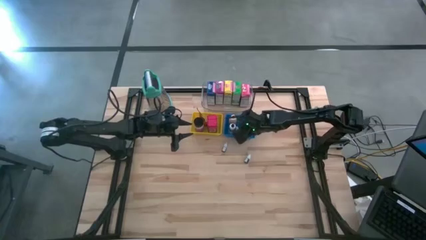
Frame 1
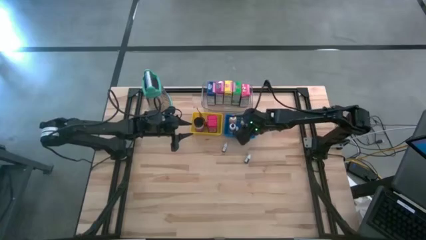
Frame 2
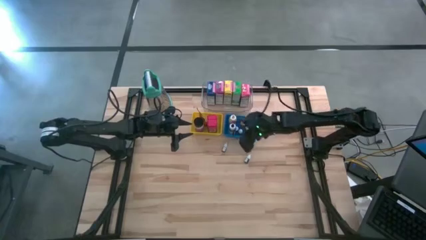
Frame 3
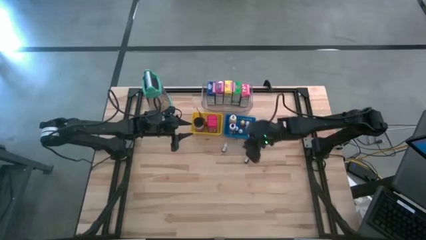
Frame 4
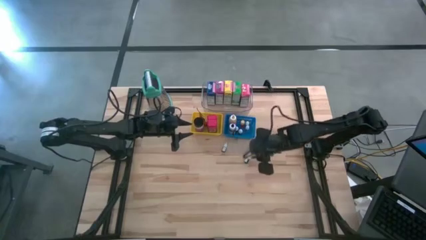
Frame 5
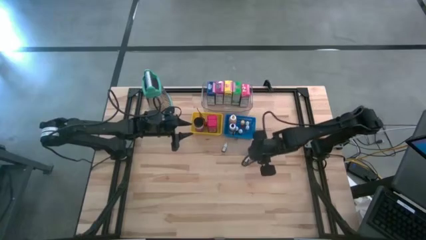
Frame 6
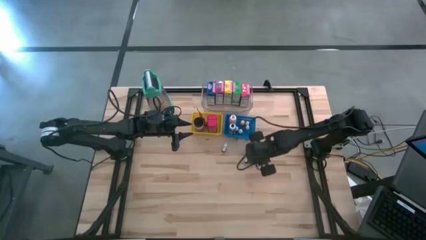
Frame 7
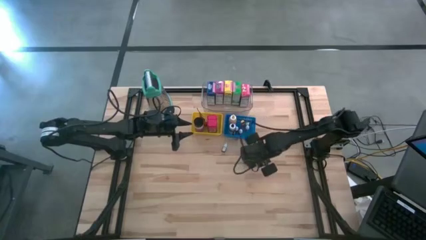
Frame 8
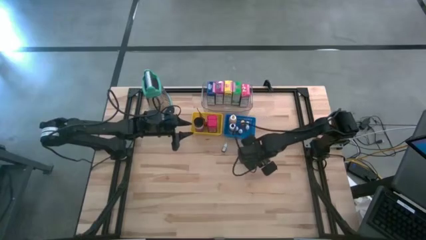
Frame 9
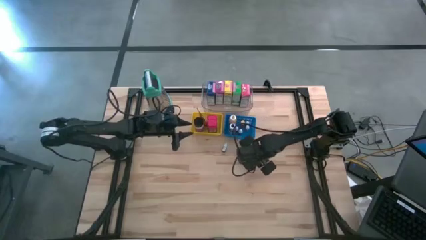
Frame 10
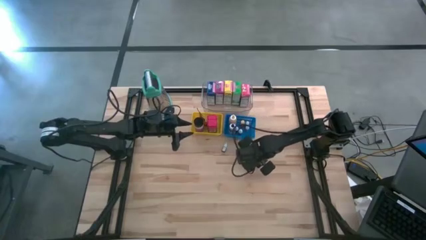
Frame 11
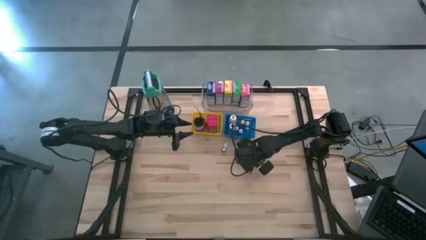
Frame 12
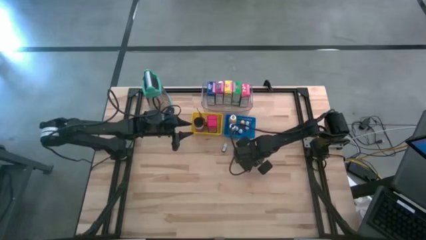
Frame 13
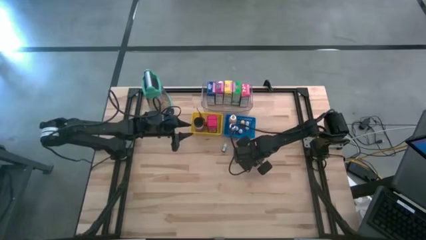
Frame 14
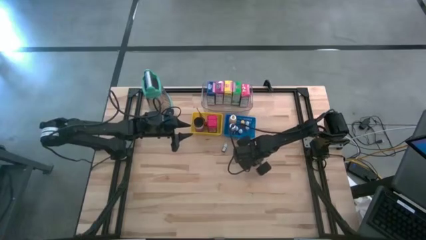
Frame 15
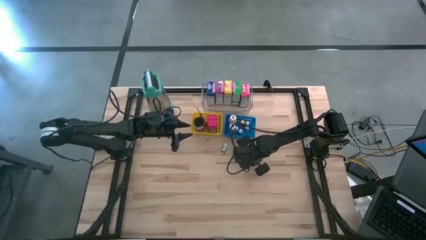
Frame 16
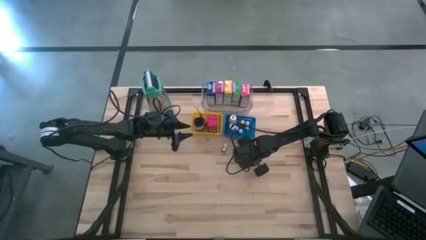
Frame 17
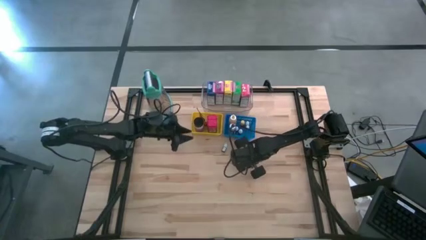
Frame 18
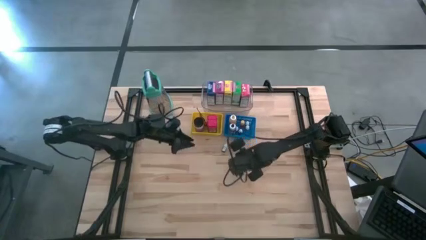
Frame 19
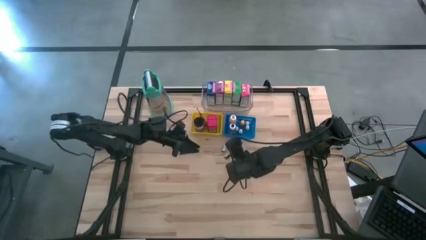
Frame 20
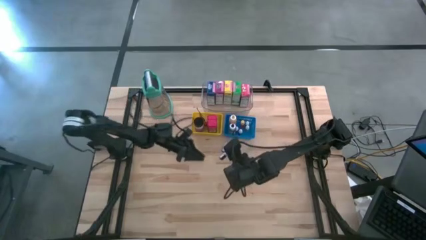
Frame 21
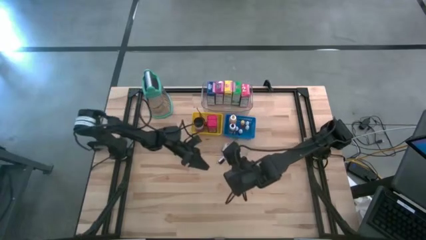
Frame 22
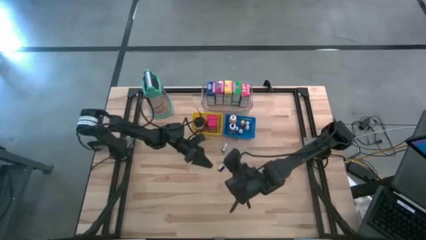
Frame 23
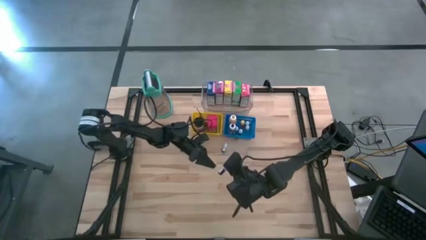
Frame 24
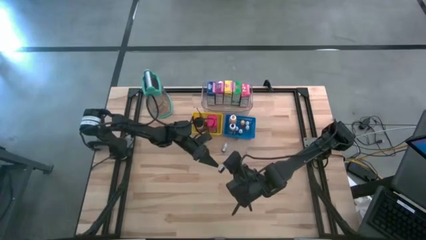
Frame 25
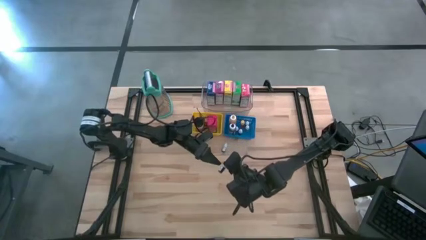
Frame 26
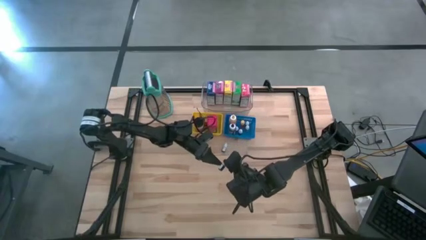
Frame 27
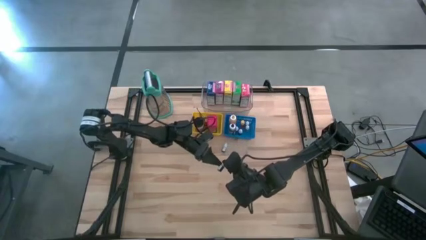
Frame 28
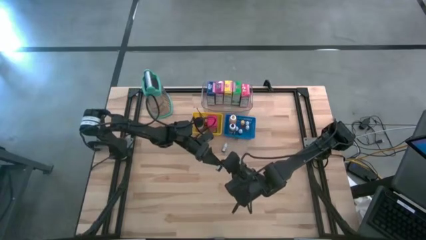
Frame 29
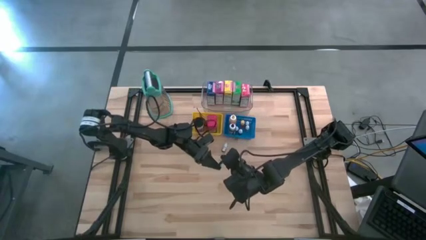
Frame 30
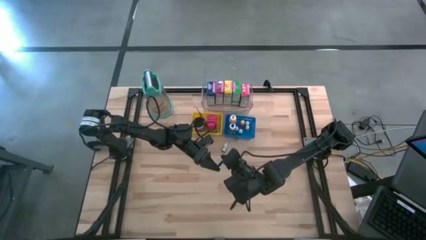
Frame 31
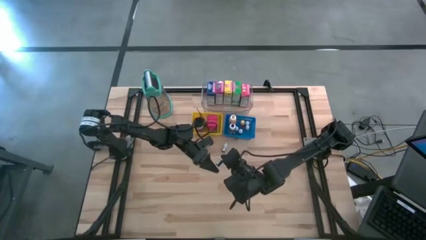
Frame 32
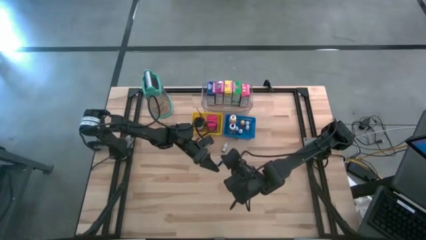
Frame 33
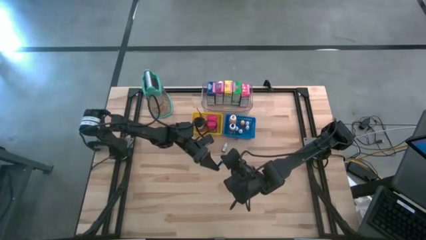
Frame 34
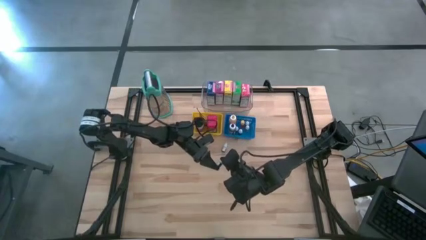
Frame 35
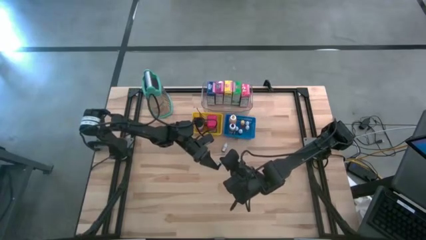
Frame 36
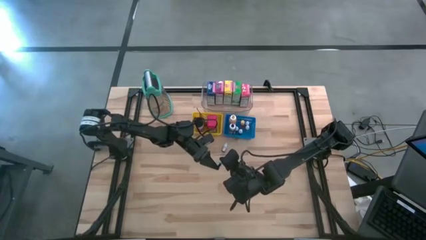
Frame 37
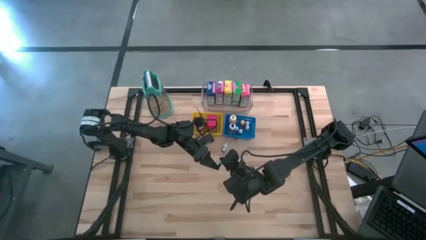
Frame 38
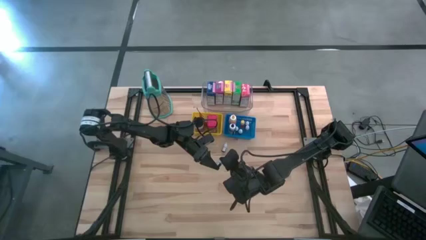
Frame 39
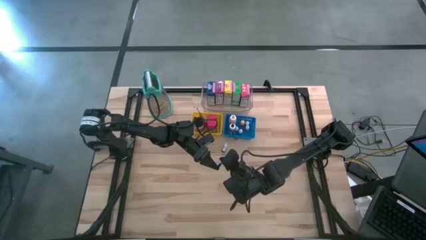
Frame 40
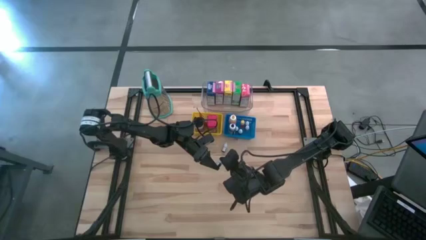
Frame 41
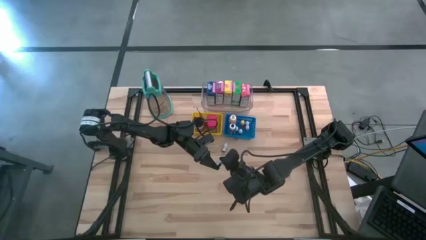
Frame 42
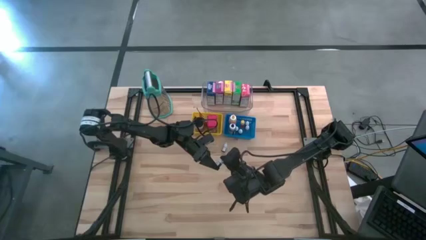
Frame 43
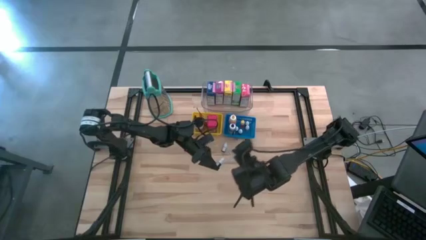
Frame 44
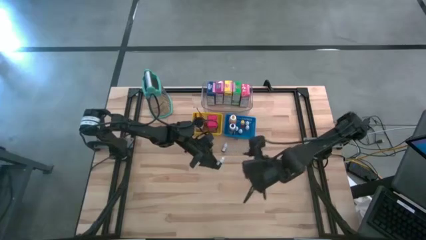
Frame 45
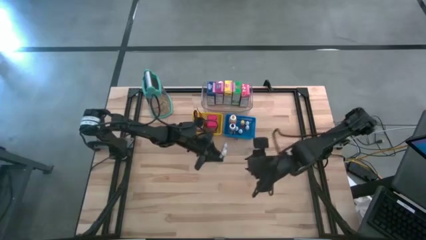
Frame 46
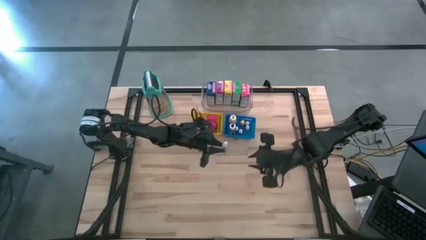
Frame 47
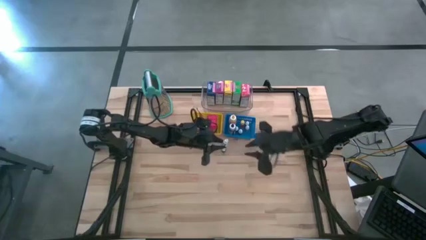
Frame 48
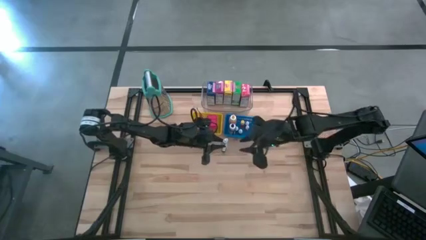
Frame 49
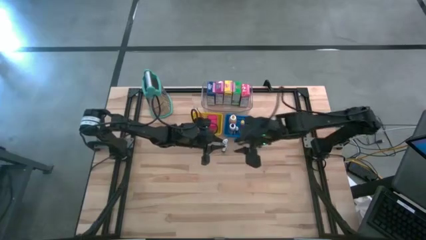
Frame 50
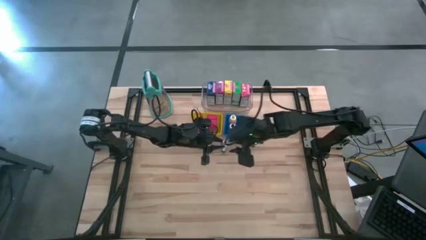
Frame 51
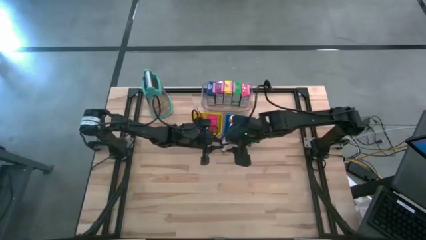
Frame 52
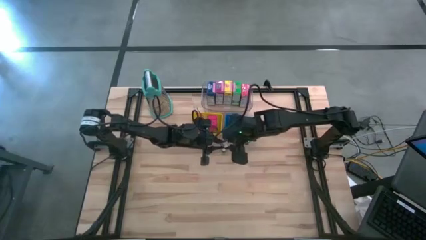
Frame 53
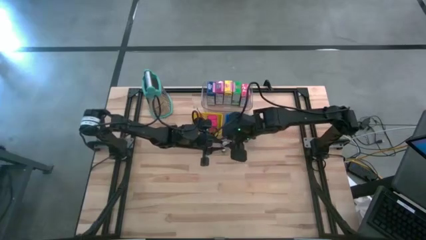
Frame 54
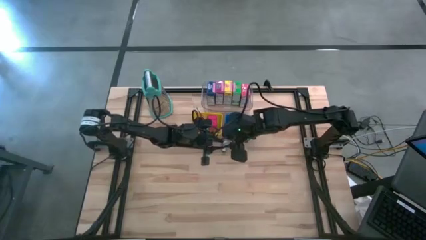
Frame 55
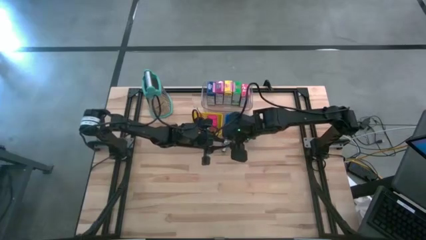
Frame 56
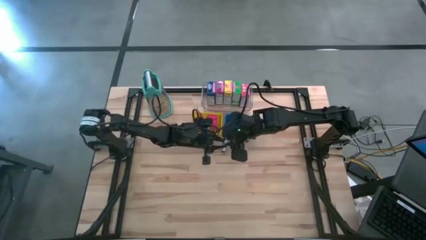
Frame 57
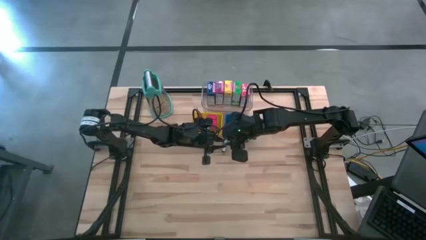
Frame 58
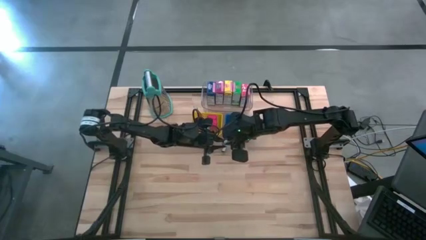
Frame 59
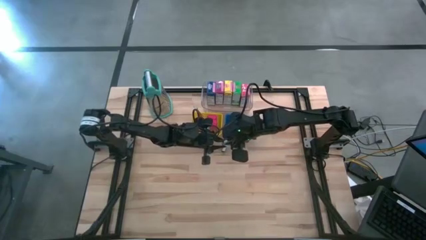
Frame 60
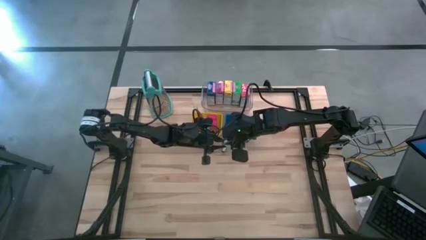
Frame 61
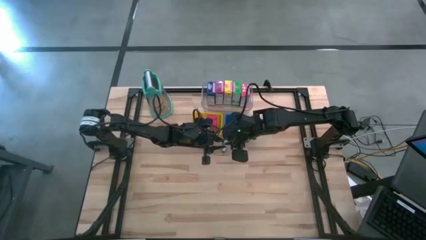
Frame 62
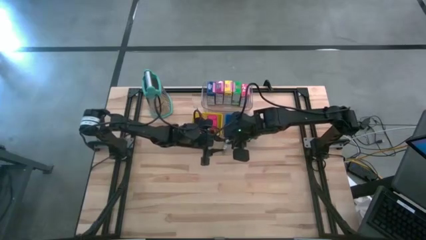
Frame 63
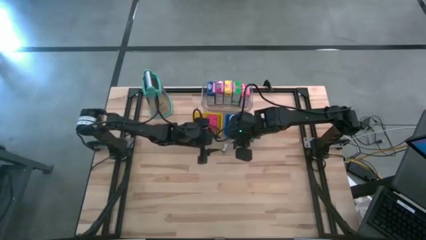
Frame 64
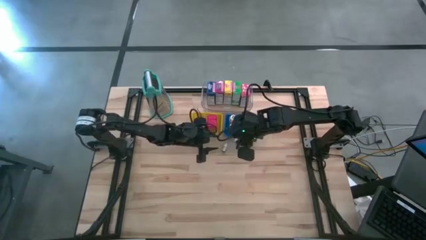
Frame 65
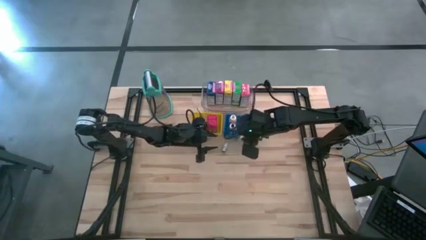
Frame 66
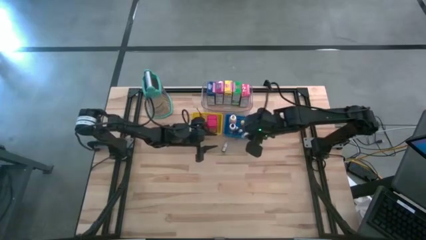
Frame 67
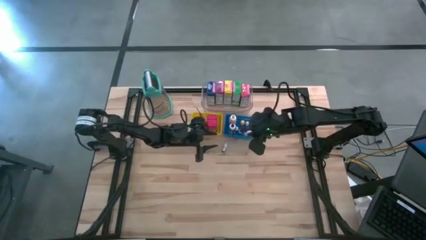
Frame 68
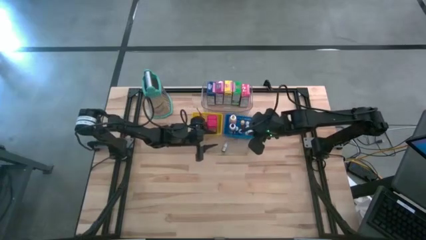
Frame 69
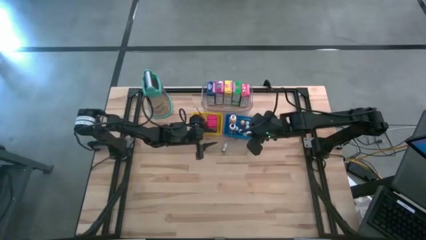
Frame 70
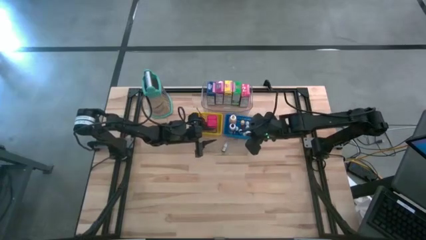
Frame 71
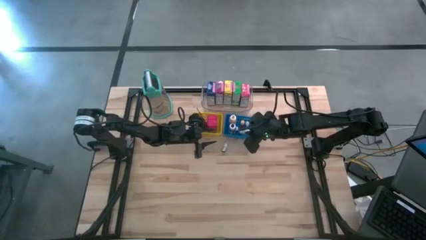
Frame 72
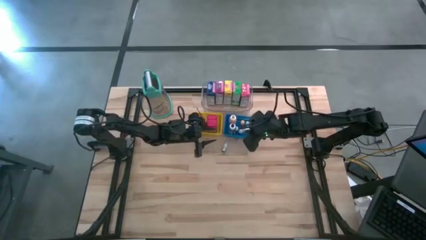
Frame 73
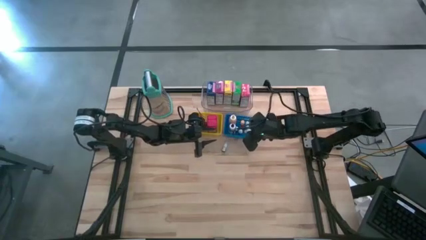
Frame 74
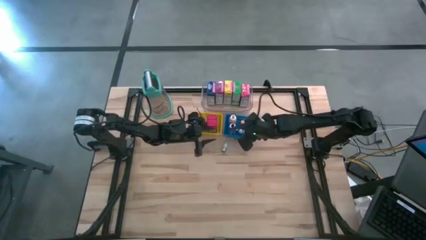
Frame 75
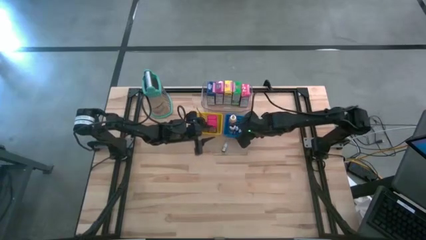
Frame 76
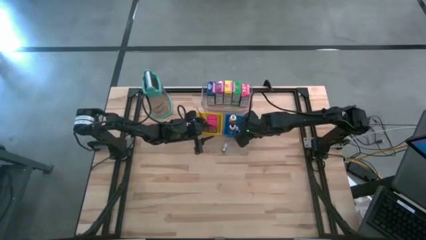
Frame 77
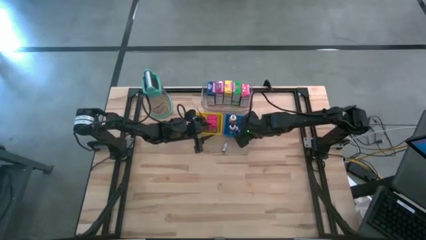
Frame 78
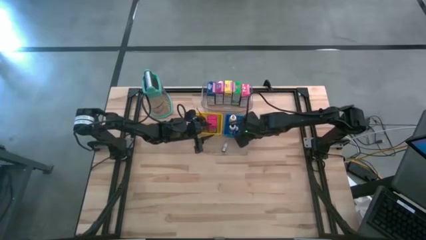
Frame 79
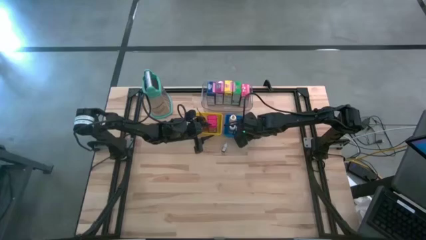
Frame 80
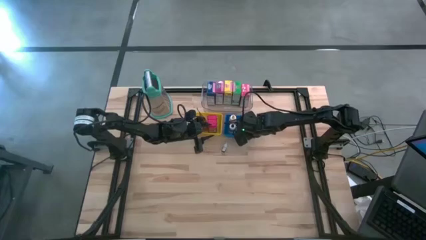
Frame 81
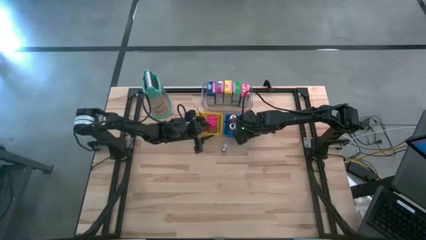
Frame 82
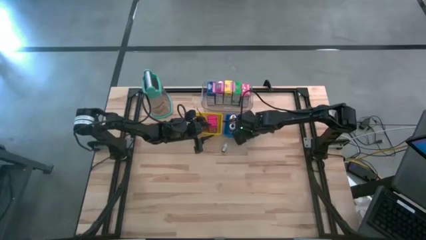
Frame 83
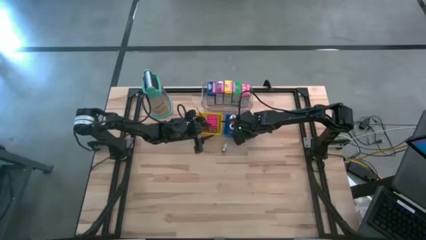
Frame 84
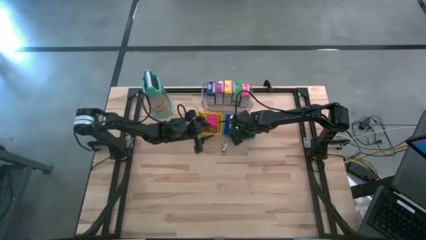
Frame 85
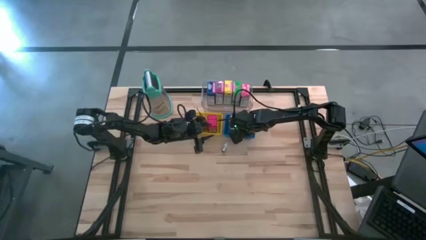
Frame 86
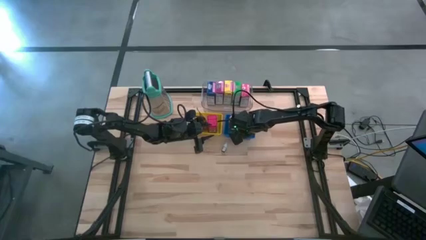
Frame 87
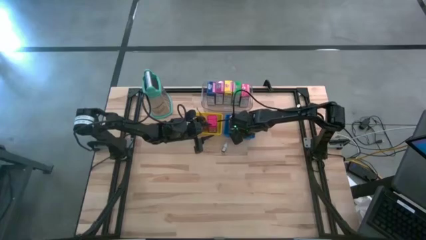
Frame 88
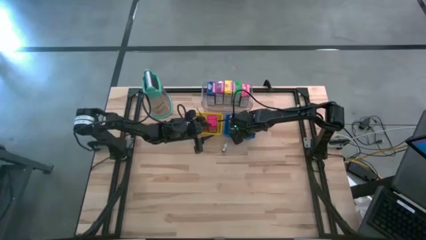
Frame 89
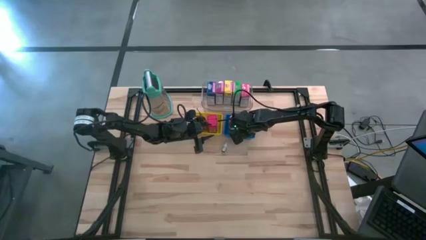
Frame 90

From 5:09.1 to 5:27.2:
Task: Pick & Place Kitchen Items
Put the small black food coloring bottle into the blue bin
